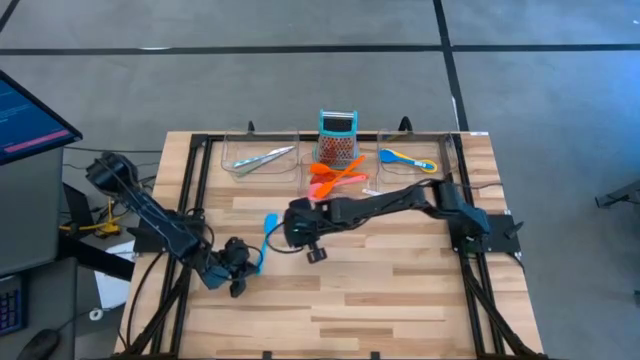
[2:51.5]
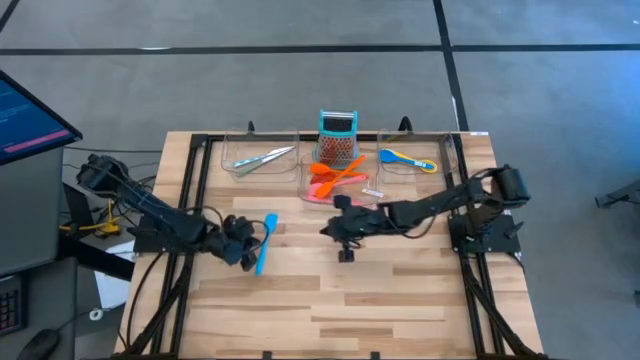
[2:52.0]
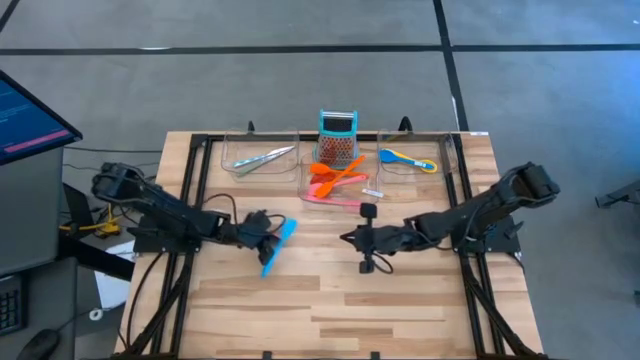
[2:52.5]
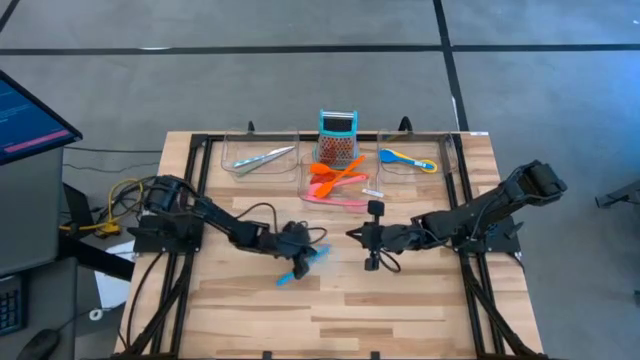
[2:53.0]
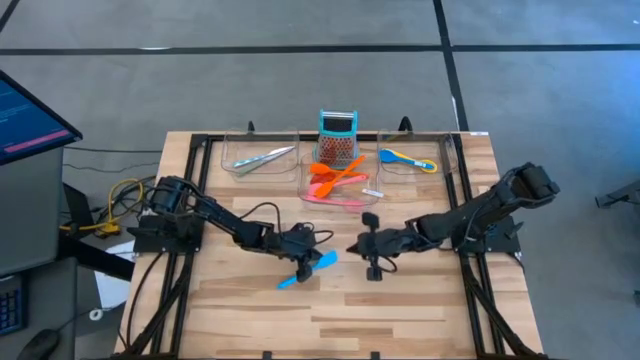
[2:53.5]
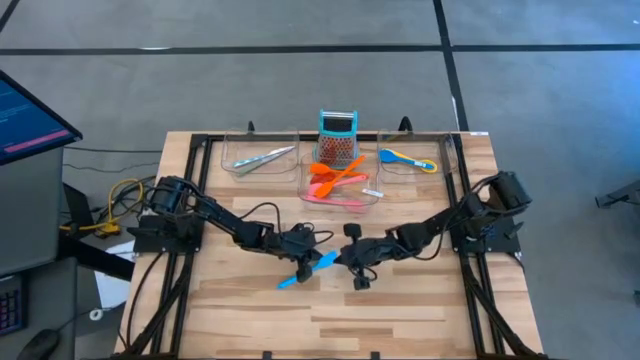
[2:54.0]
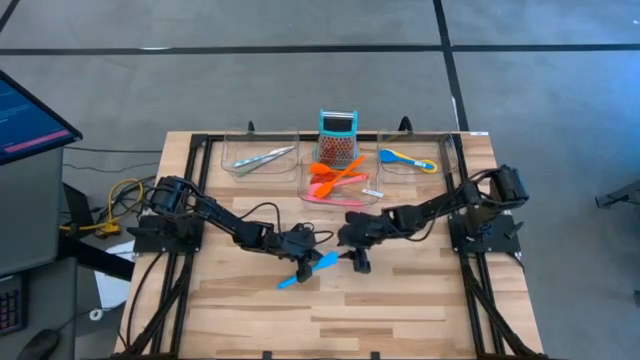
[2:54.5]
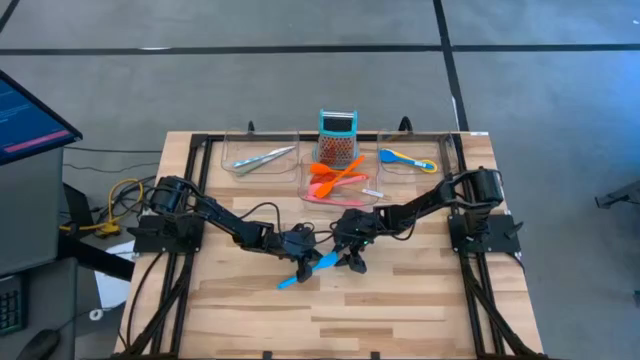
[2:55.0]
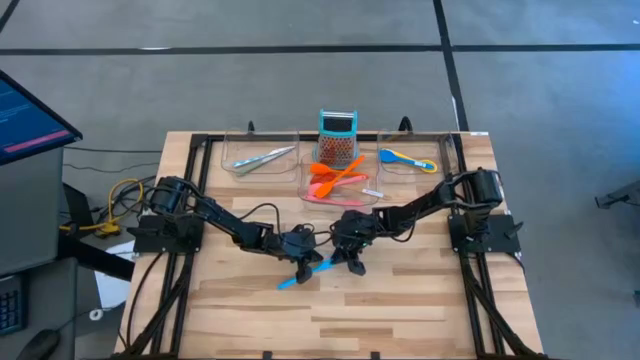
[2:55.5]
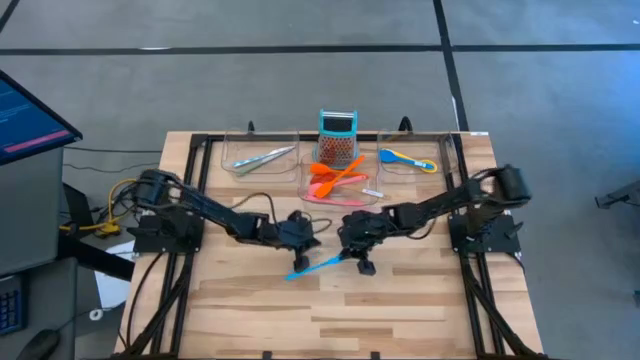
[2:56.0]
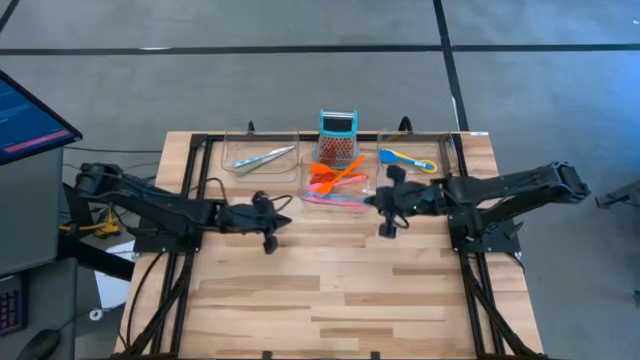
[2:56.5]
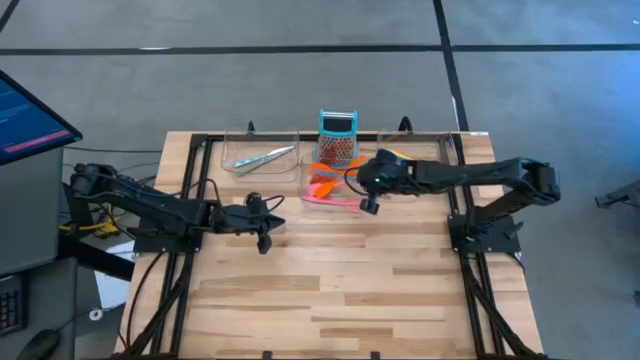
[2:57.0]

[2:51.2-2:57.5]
Task: Pick & Place Kitchen Items
Put the blue spatula into the middle transparent bin

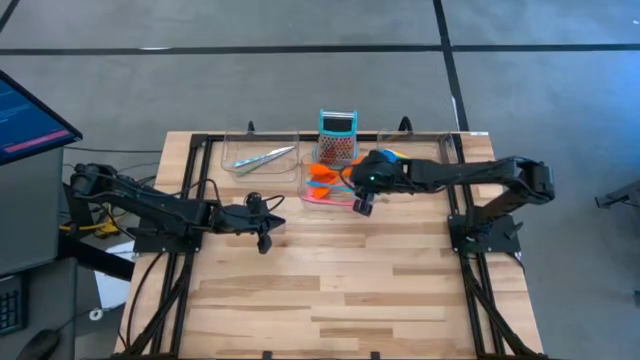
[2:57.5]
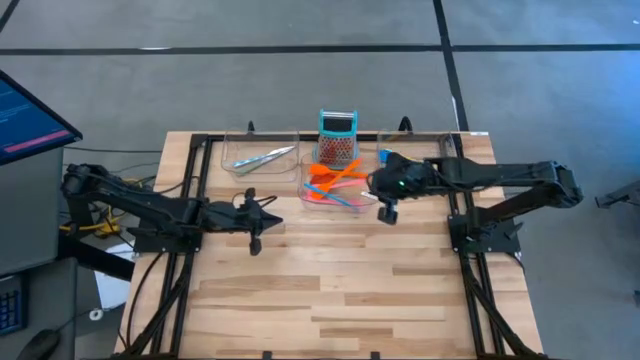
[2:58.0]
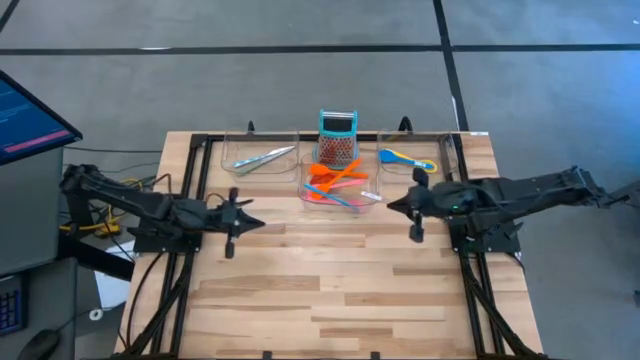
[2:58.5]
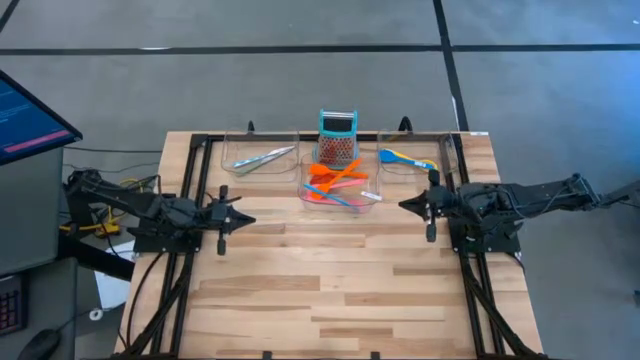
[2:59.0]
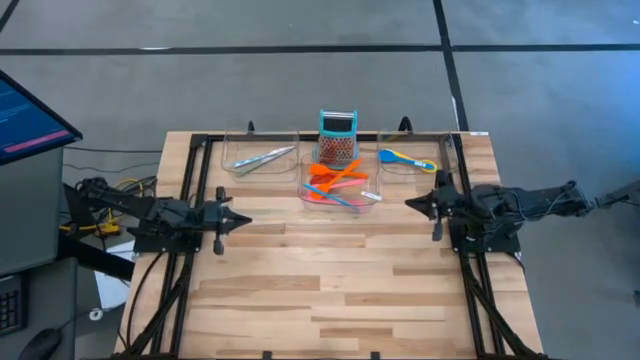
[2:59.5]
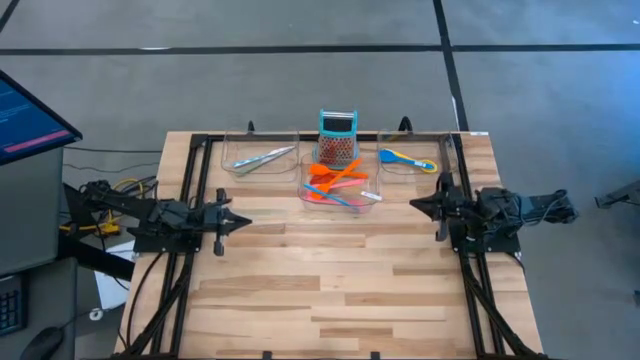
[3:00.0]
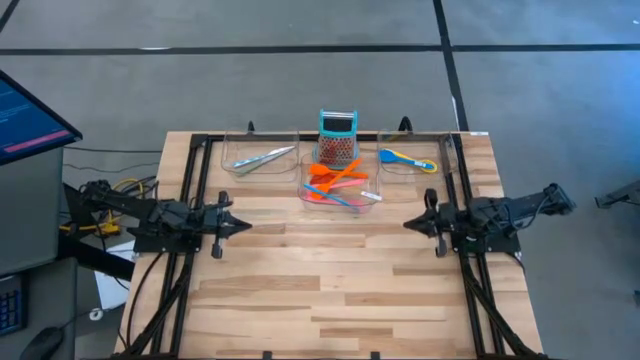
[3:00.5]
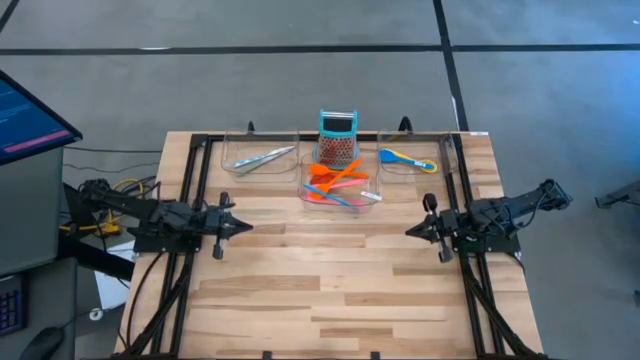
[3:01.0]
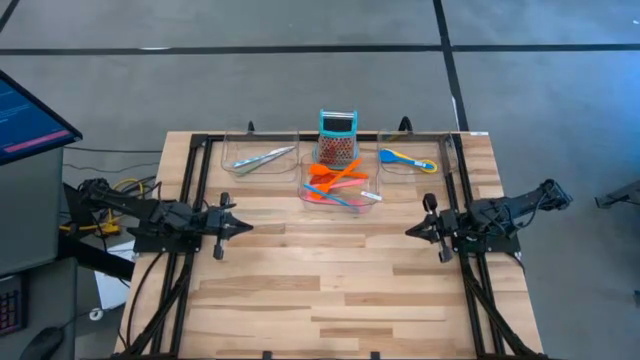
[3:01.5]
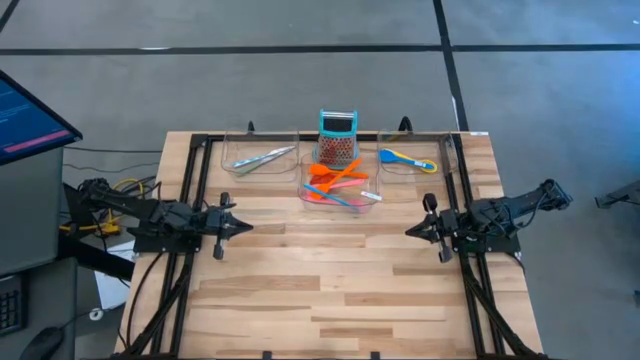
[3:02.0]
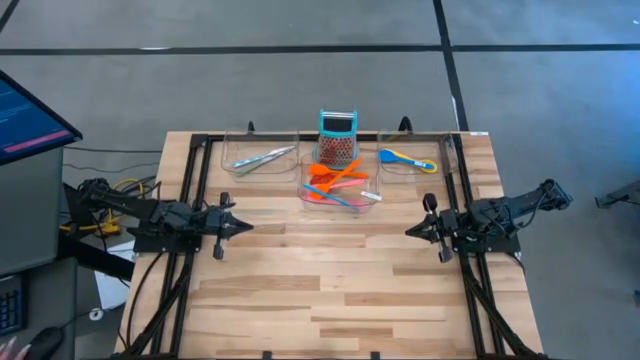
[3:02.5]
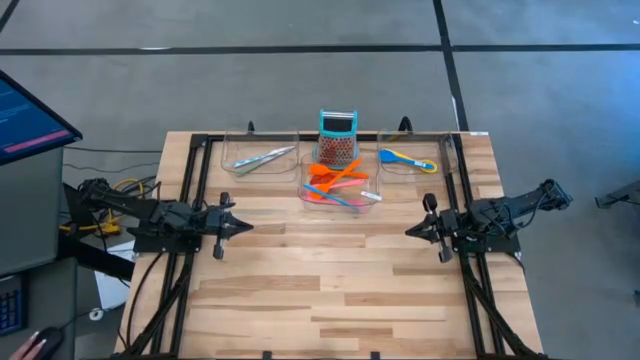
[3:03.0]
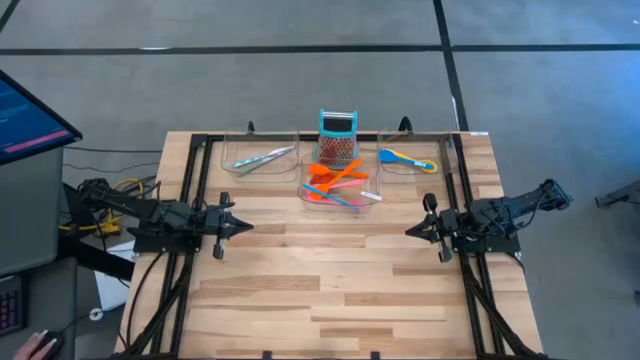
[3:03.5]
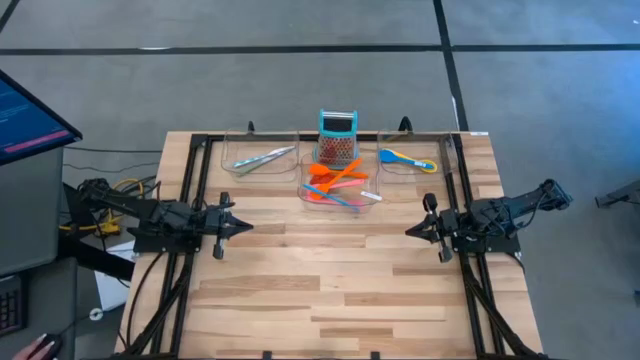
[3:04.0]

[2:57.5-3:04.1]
Return to Home Position

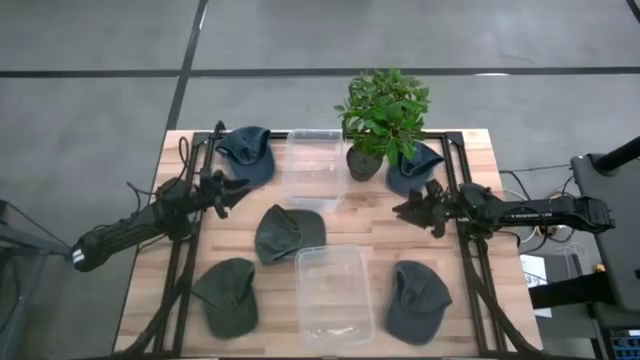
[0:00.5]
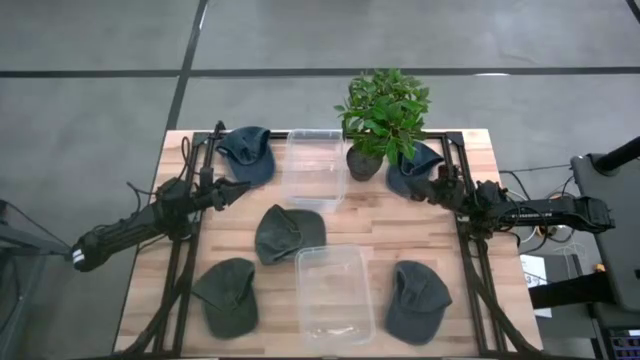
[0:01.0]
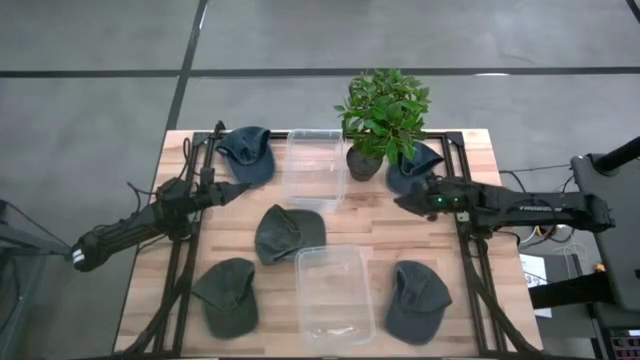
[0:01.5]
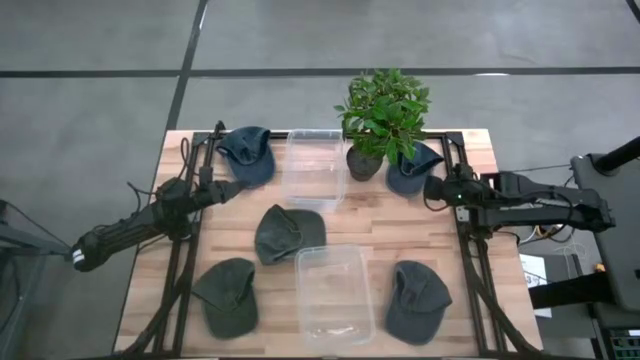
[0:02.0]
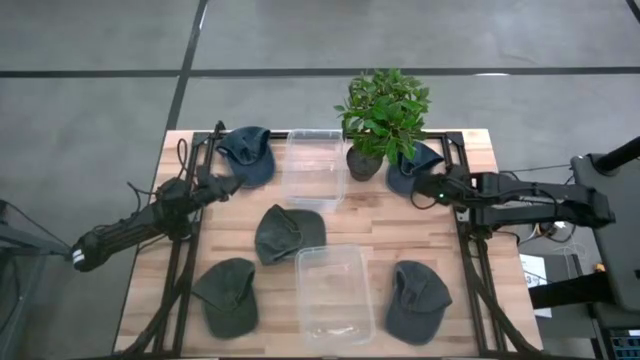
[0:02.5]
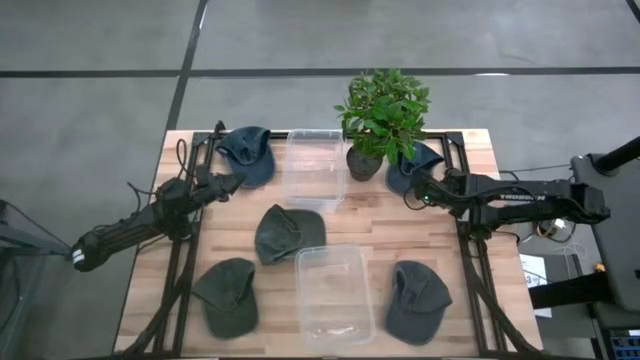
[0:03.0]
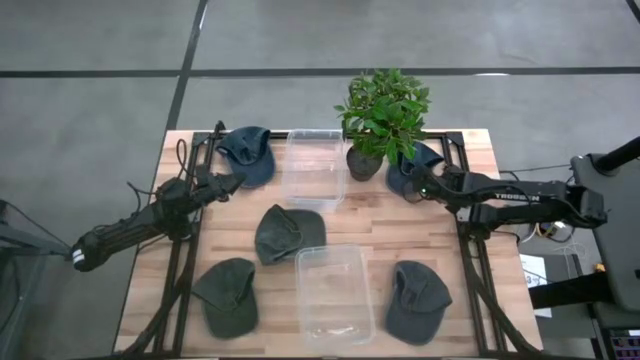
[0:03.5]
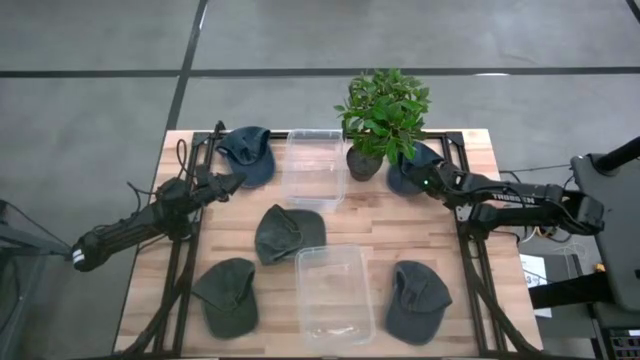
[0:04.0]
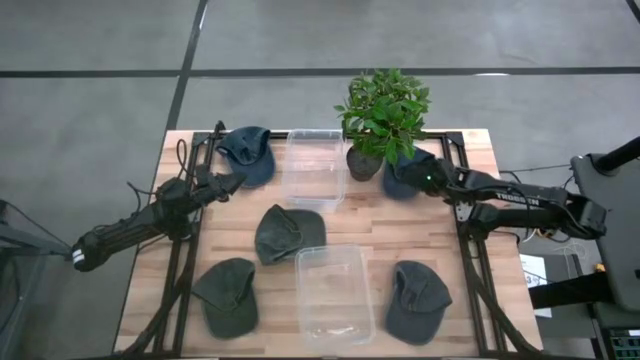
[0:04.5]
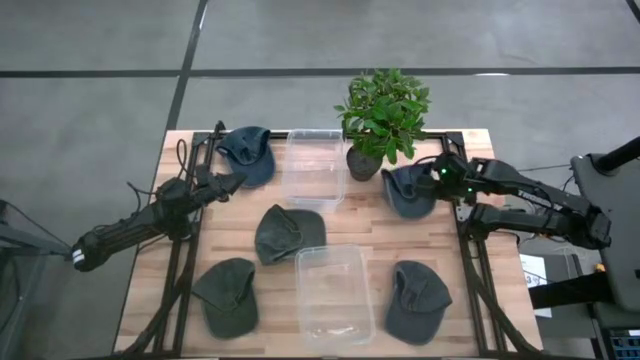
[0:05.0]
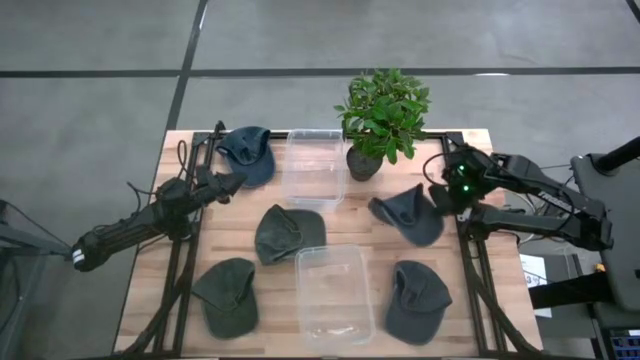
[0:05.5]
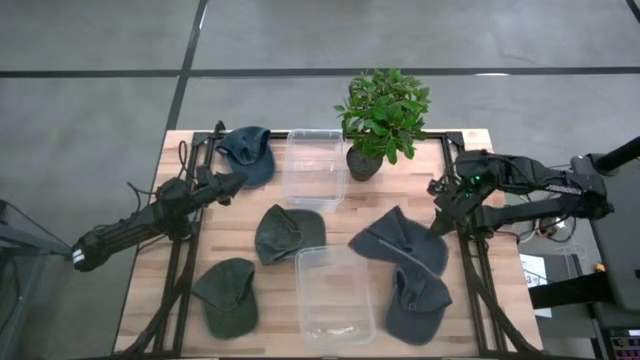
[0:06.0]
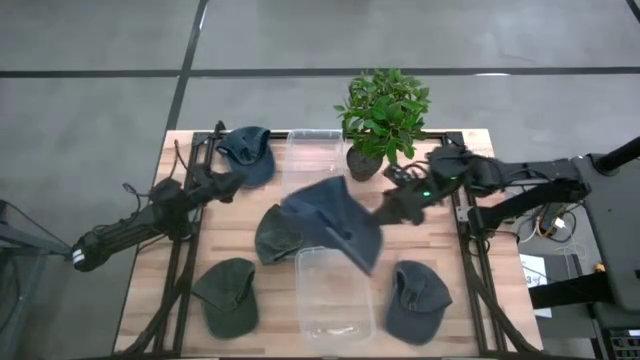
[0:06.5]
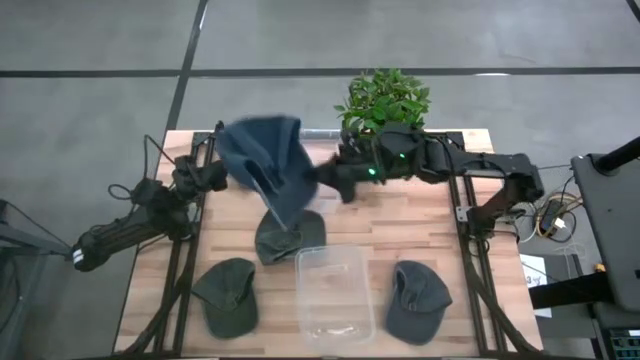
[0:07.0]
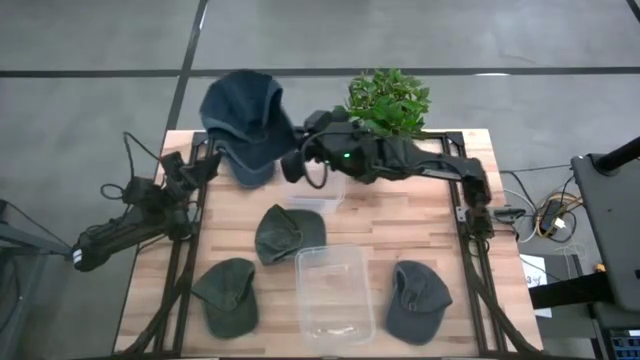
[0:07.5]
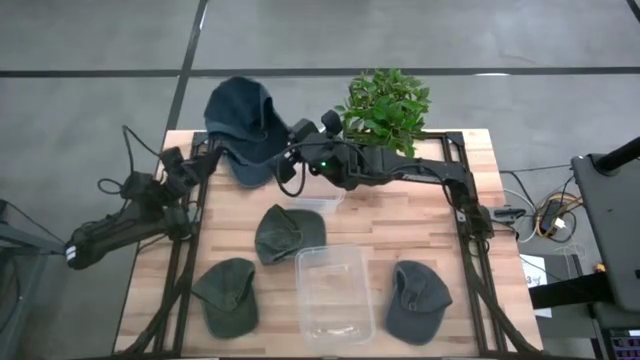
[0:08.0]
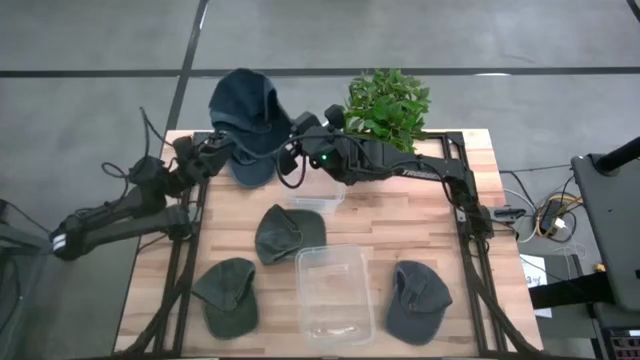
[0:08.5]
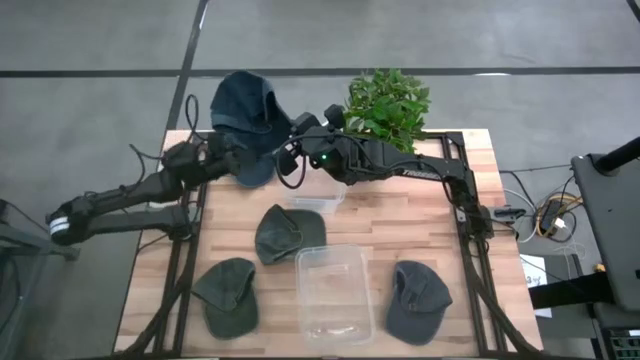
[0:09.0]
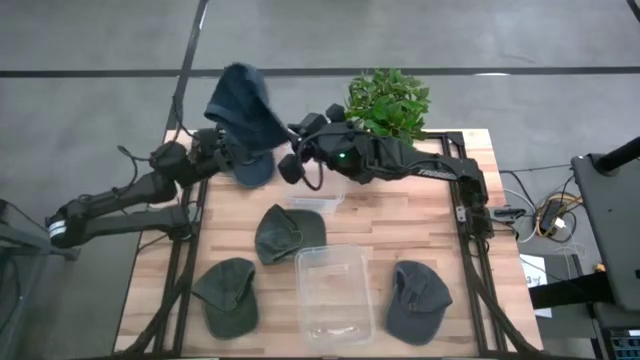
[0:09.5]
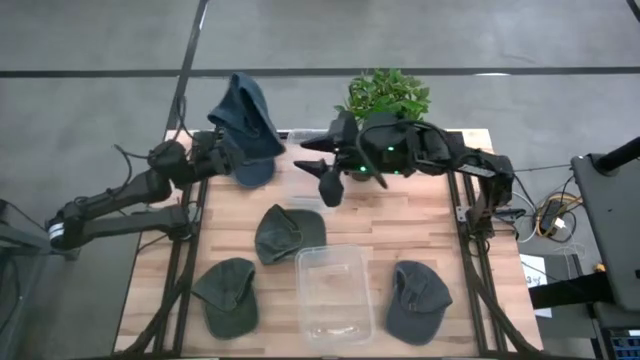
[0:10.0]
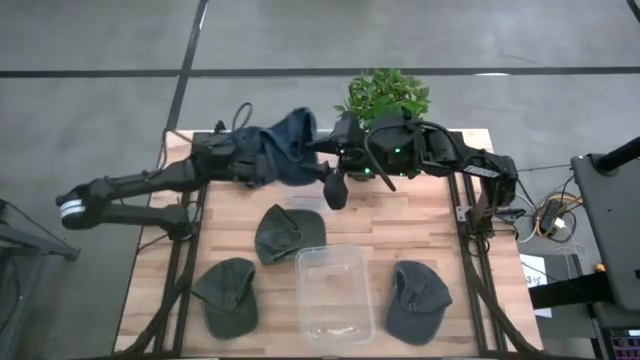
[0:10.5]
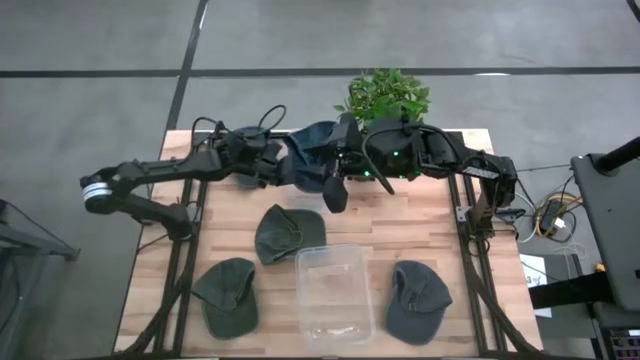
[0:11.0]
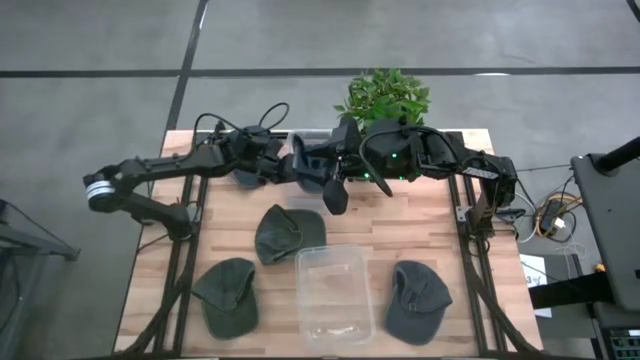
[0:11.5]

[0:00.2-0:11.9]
Task: Pick & Place hat
Put the right blue cap into the top transparent bin
